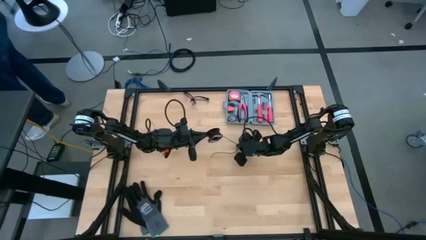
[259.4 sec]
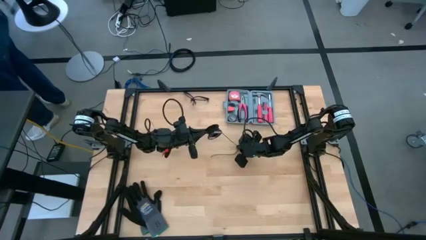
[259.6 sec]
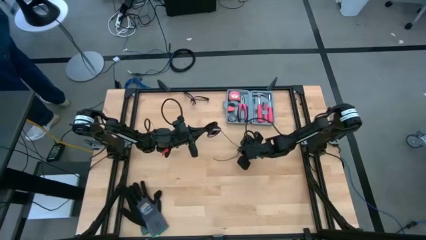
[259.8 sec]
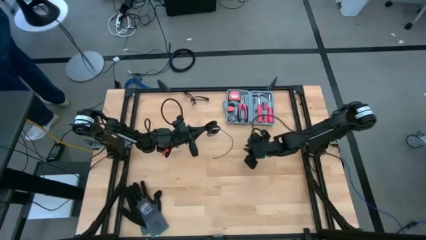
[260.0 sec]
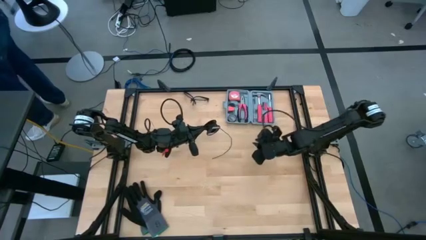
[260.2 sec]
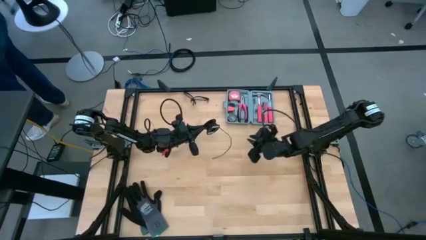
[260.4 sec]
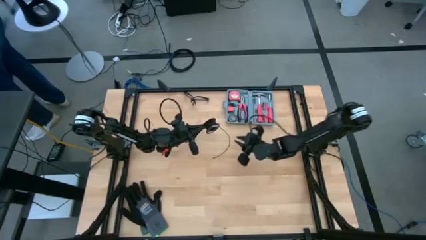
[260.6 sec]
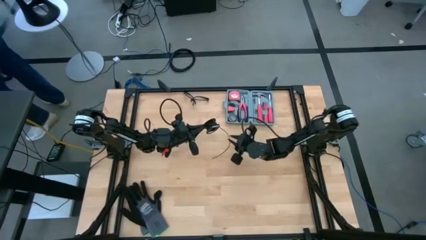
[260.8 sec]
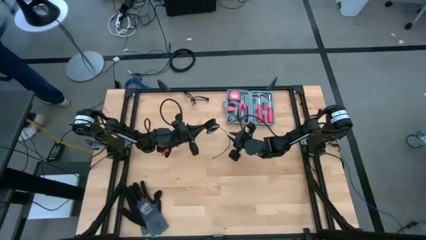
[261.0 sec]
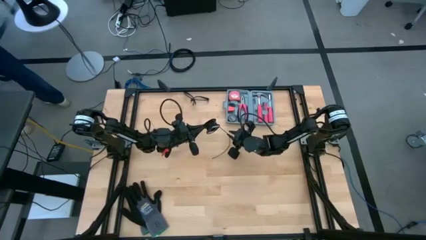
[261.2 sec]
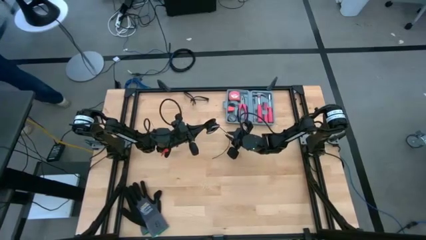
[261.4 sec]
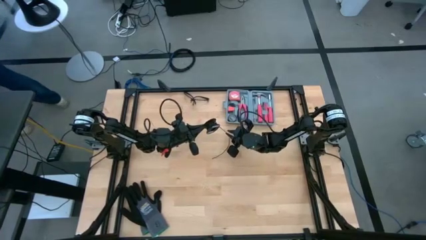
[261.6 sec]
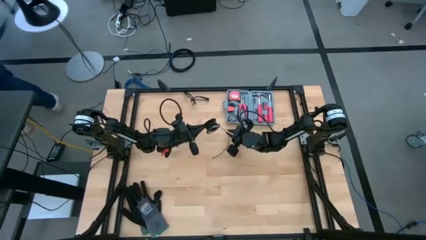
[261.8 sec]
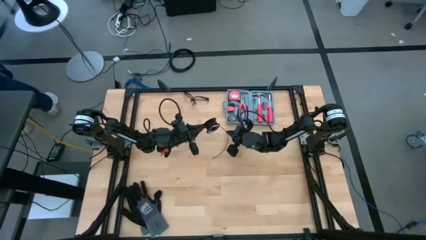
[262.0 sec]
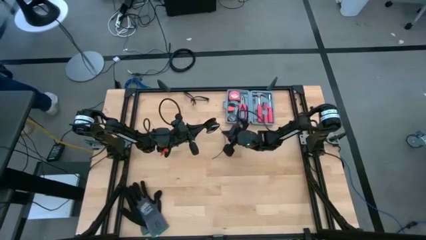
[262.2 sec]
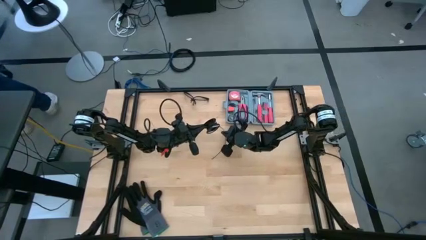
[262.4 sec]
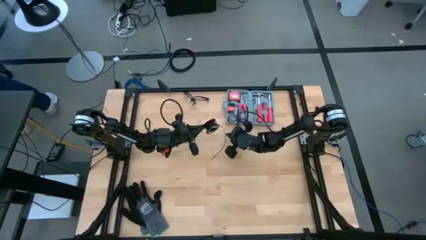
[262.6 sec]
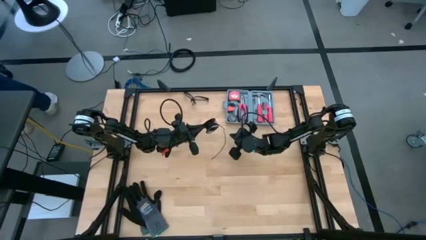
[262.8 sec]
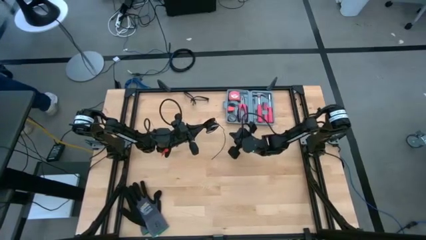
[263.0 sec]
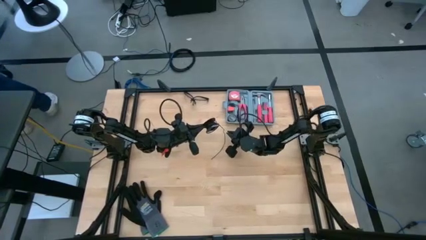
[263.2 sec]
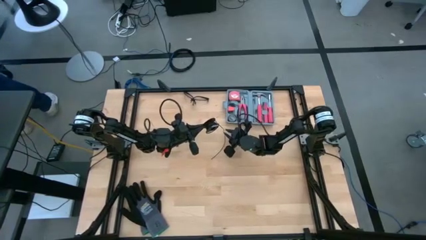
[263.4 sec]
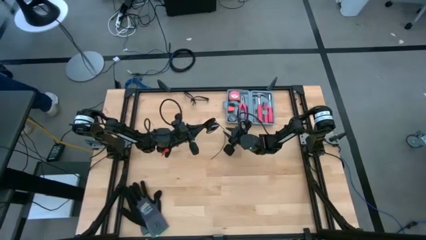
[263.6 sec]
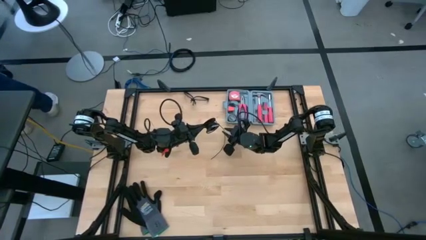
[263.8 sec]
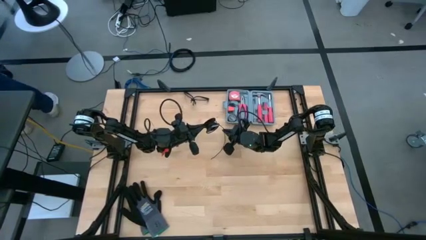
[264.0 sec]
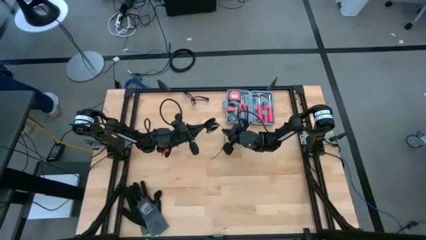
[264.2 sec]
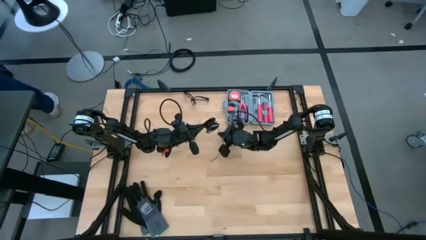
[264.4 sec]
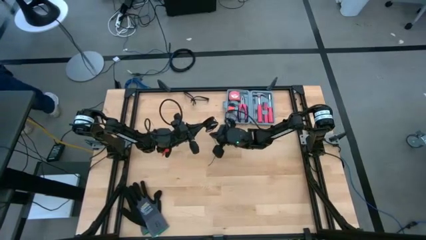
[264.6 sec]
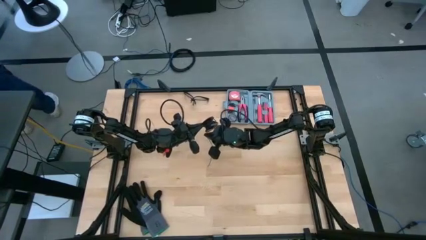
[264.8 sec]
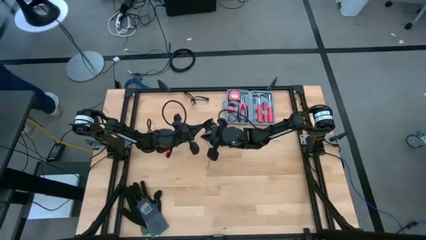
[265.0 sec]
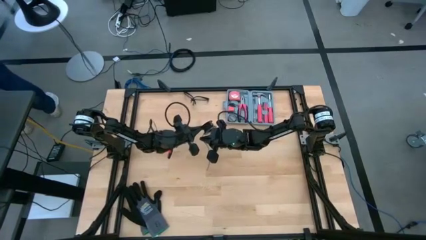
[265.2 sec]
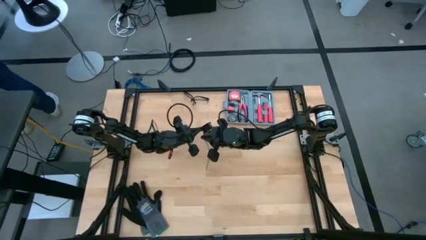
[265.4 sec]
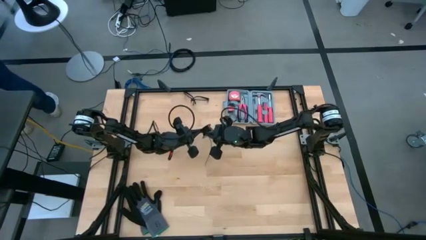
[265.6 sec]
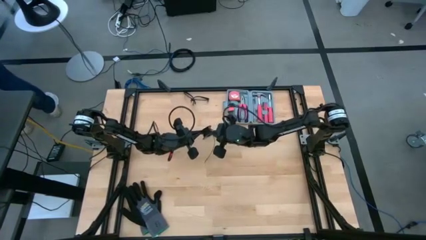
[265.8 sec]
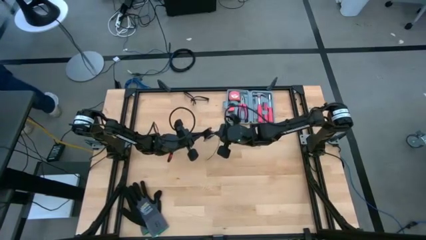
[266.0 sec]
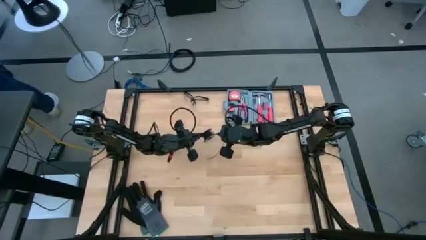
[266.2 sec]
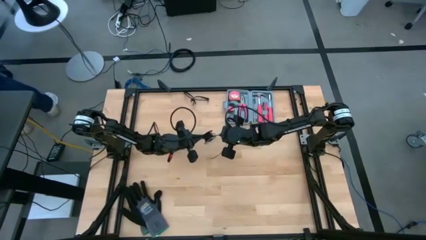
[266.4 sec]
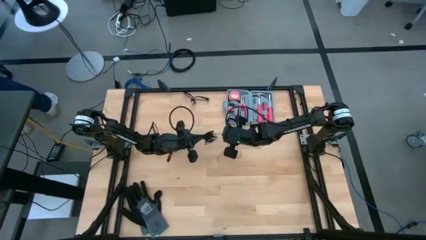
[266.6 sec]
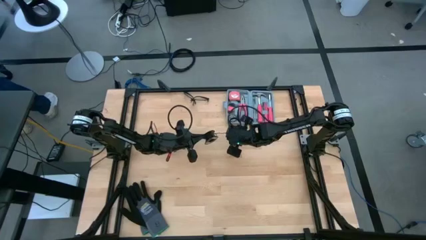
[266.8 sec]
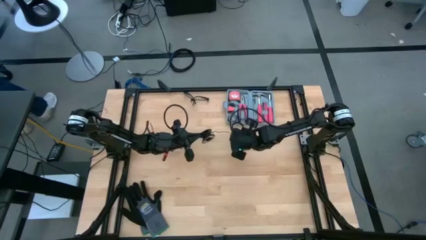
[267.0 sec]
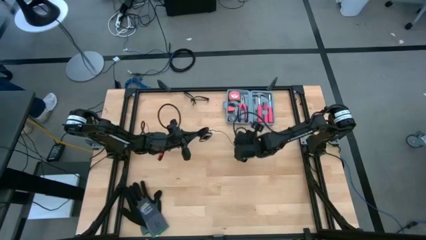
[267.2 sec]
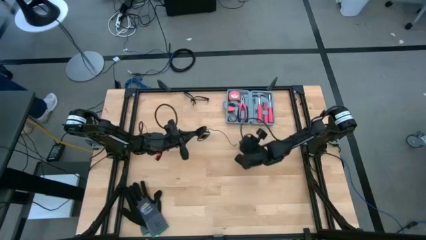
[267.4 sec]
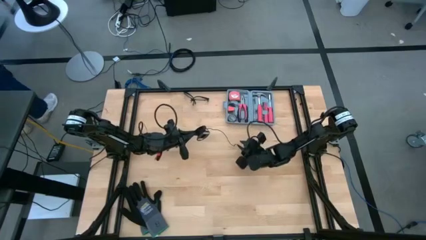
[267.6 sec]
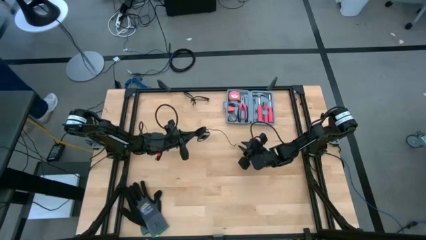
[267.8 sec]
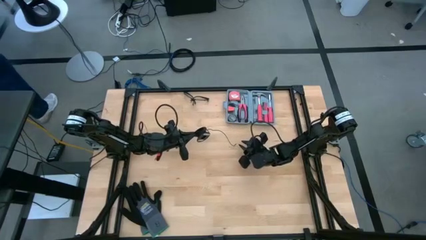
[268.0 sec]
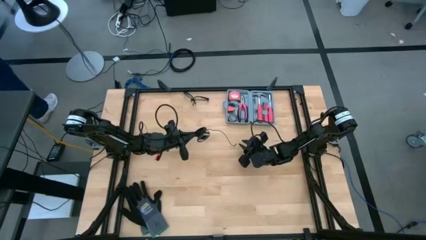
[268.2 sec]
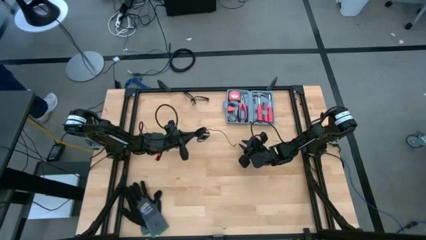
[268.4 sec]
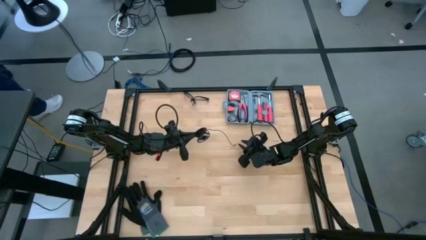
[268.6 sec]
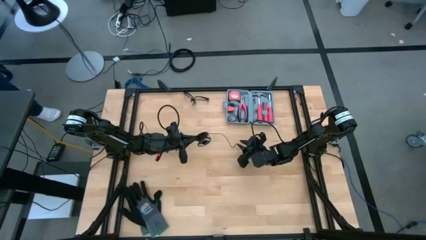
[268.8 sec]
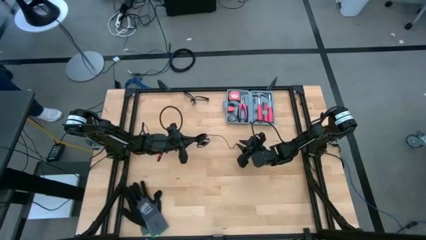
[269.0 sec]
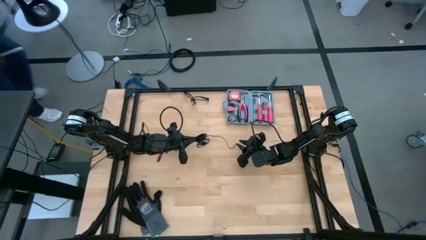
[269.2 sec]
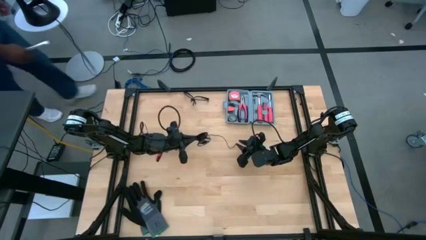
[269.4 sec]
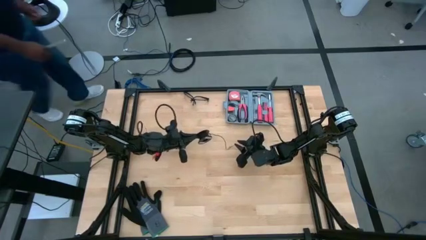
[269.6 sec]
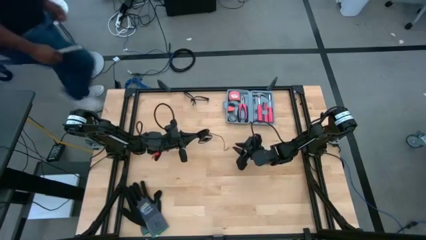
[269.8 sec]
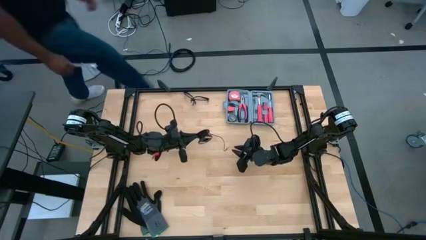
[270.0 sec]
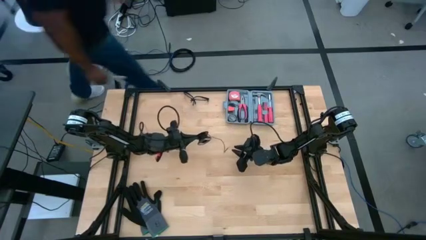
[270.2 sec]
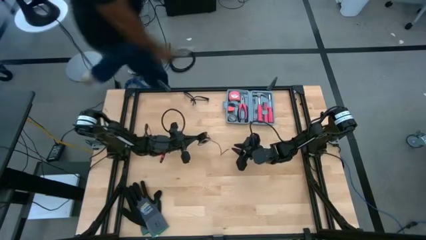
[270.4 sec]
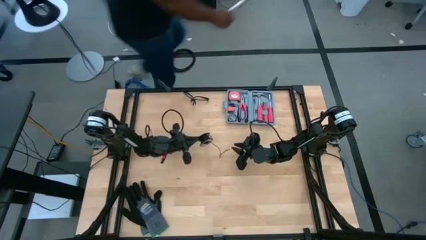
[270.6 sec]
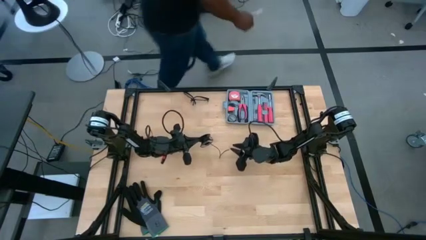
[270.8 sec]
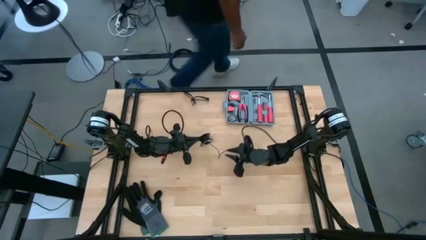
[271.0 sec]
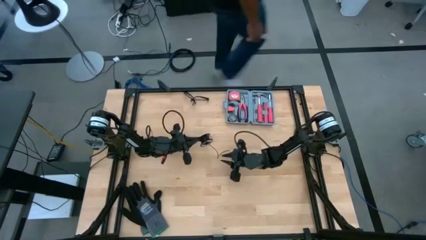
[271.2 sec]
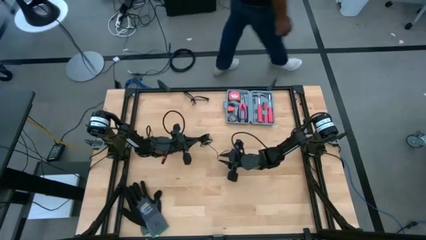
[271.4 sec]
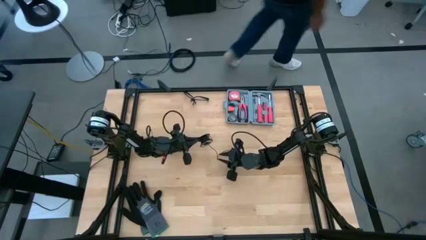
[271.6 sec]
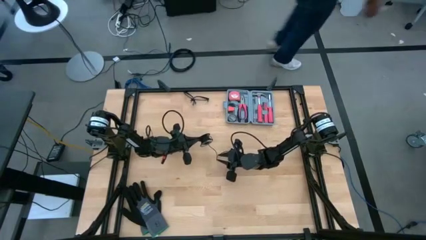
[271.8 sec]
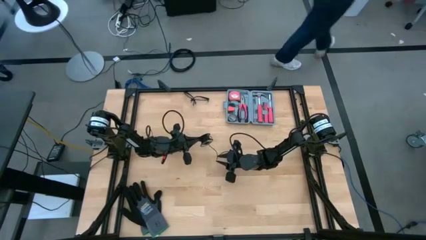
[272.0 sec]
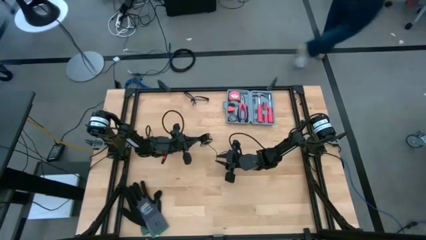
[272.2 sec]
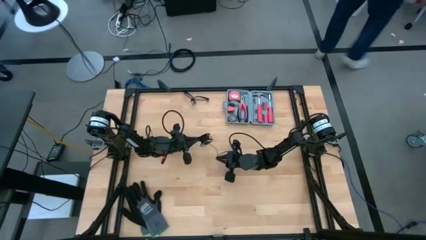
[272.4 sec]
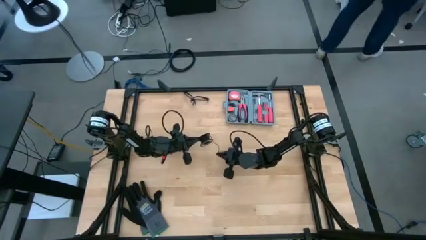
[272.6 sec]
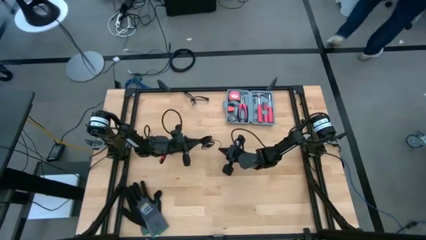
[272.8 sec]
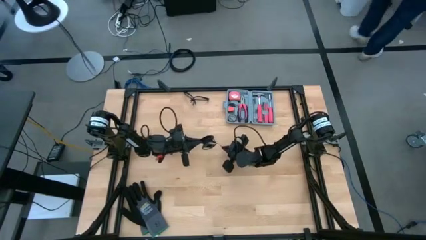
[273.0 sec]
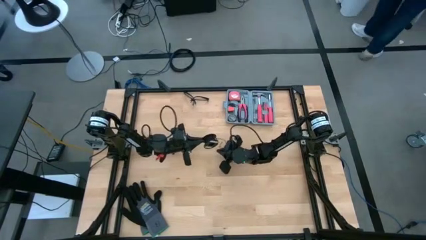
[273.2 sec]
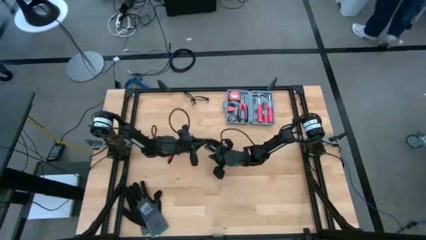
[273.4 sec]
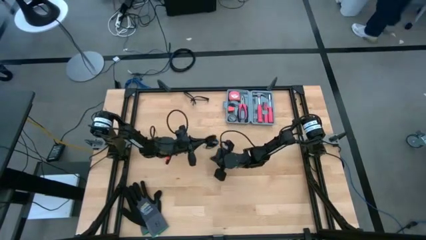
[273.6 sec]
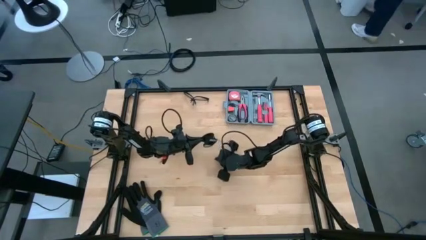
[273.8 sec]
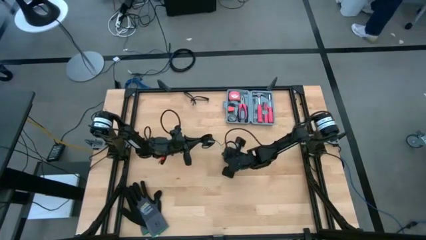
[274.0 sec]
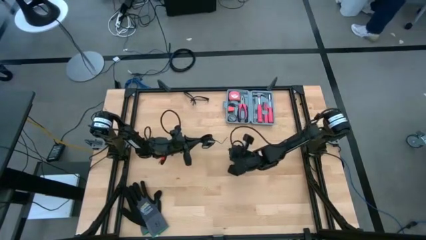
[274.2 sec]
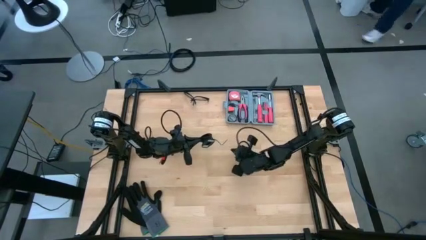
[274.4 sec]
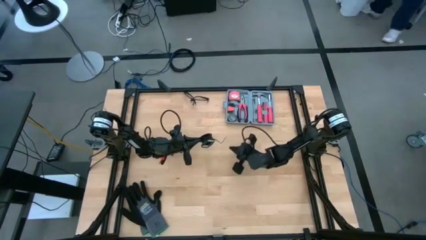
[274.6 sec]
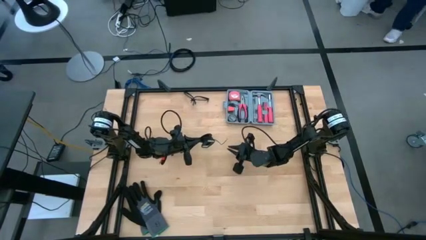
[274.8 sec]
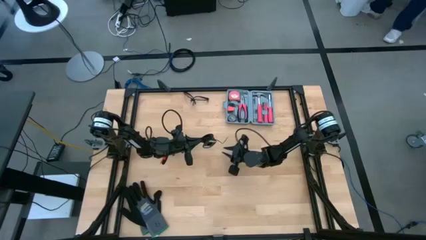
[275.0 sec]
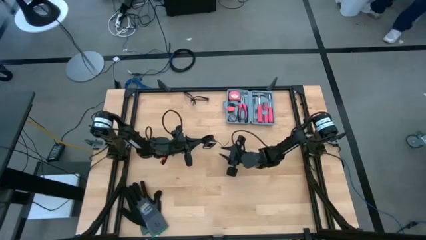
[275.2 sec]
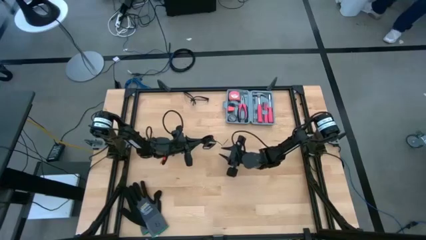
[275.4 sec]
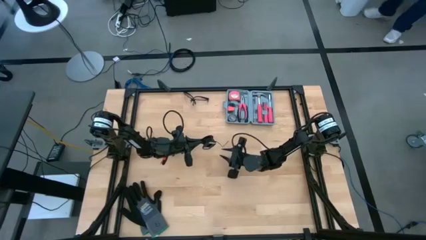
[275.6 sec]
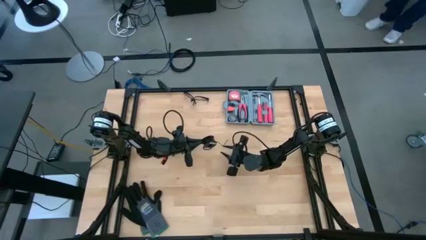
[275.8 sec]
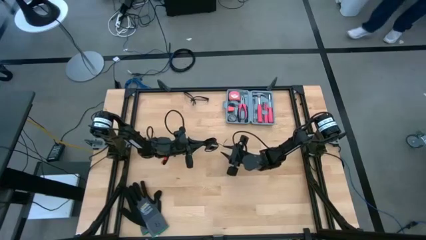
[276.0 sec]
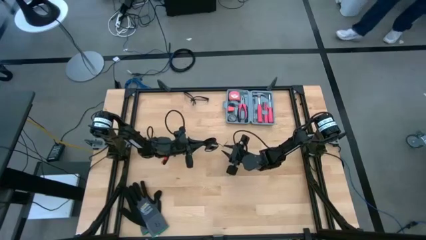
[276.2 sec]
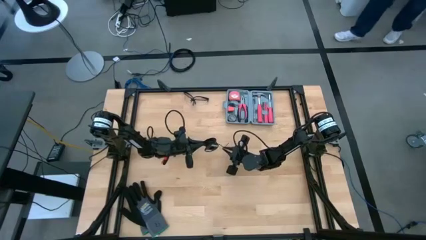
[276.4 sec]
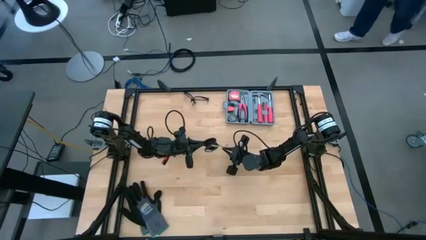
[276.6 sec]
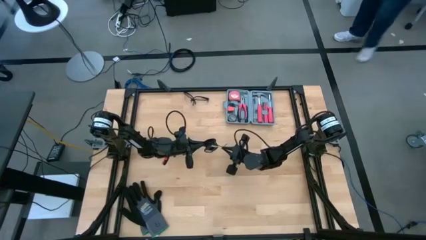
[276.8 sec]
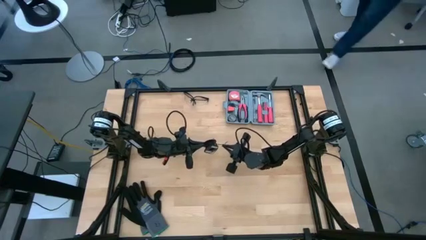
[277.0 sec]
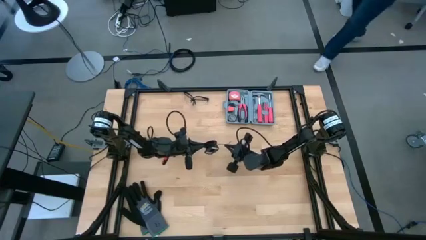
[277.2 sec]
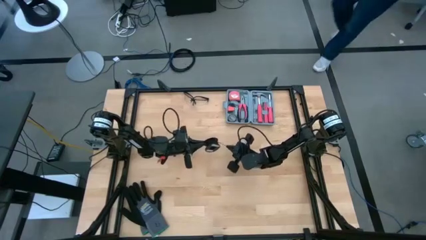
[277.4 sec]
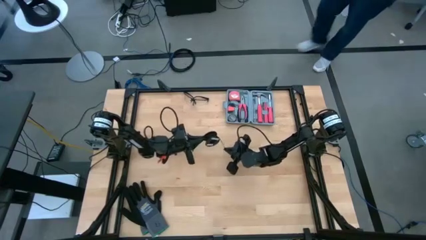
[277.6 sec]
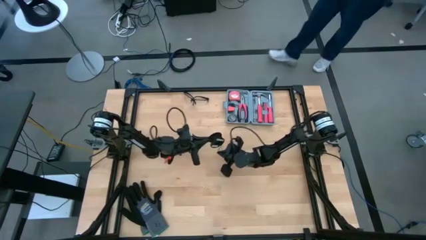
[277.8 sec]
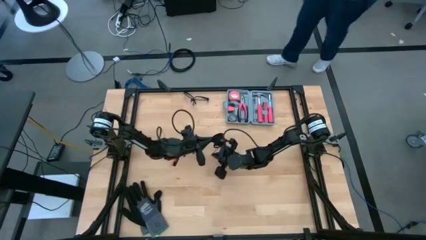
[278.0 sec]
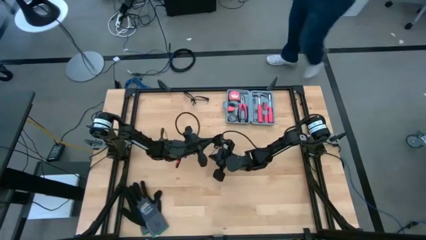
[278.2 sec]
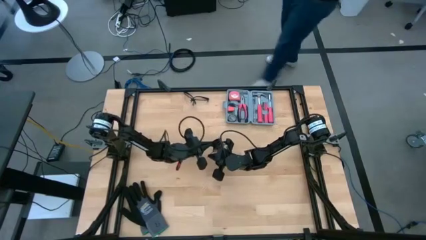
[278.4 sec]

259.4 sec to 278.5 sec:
Task: Coil cords
Coil the black wire onto the spool
